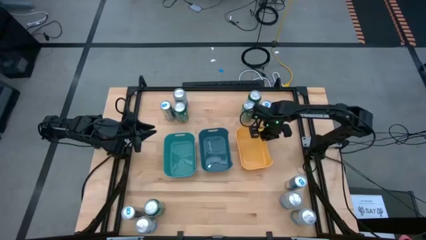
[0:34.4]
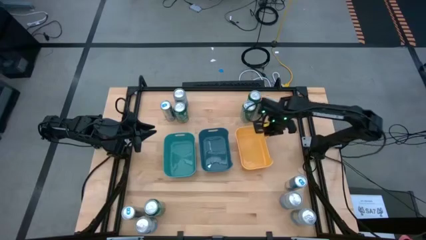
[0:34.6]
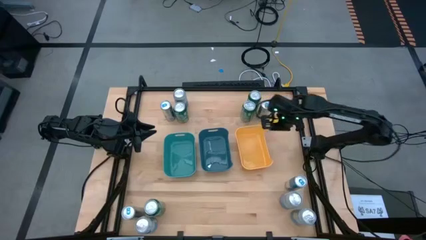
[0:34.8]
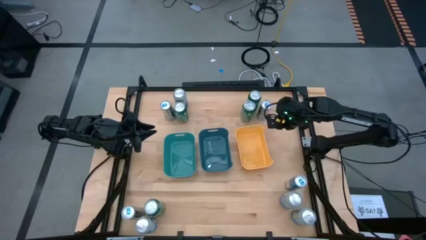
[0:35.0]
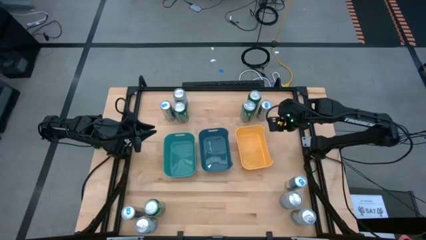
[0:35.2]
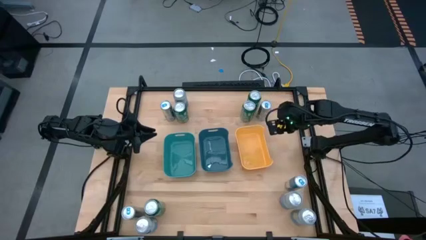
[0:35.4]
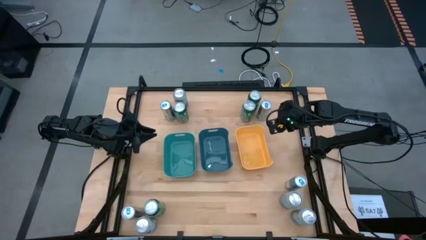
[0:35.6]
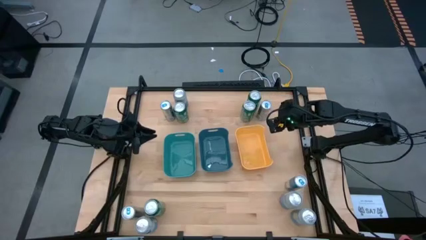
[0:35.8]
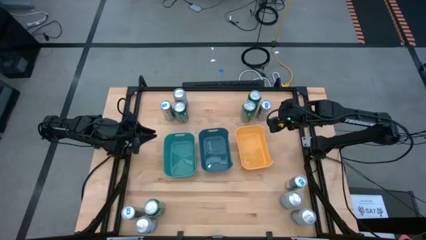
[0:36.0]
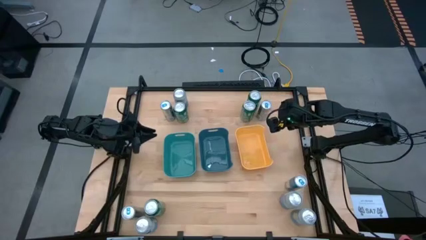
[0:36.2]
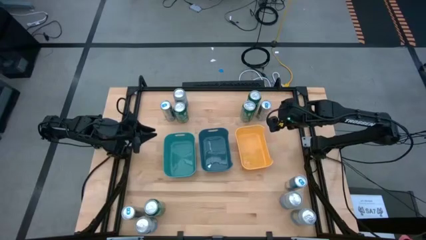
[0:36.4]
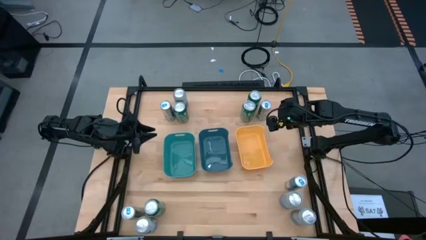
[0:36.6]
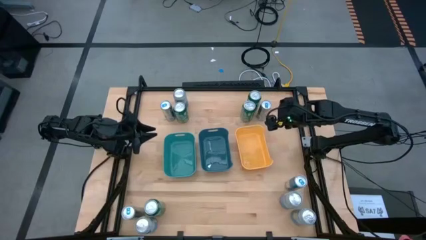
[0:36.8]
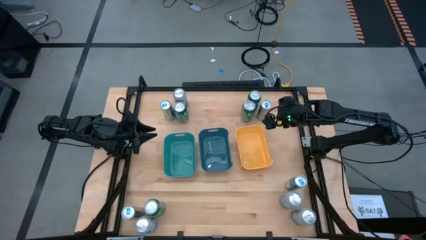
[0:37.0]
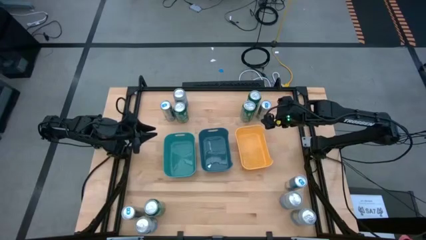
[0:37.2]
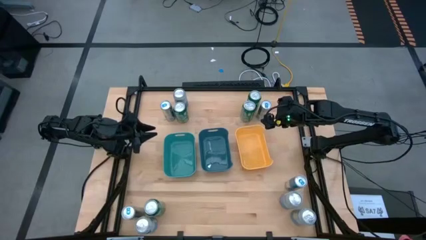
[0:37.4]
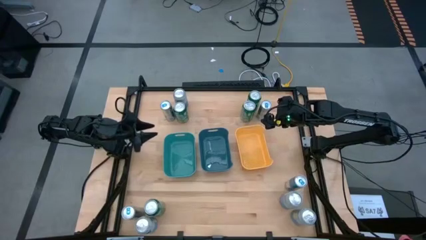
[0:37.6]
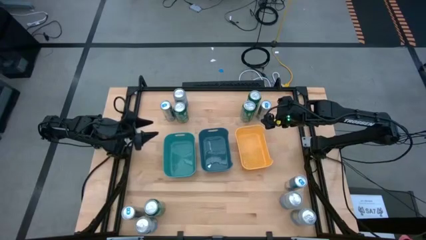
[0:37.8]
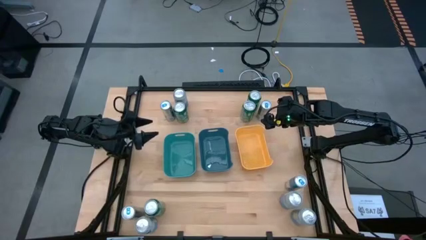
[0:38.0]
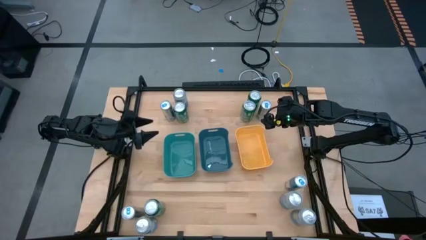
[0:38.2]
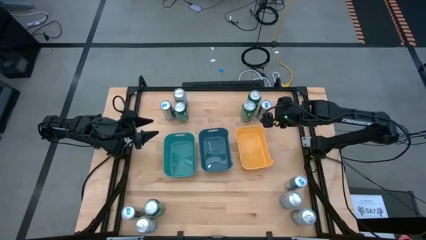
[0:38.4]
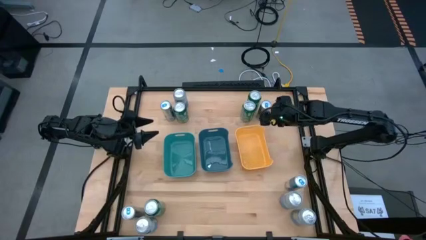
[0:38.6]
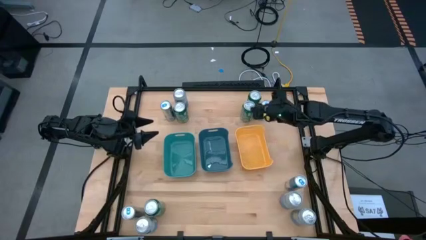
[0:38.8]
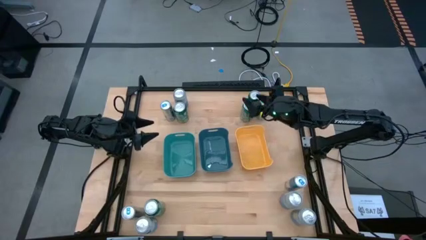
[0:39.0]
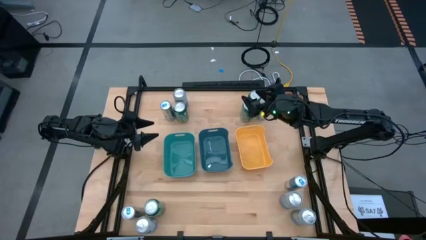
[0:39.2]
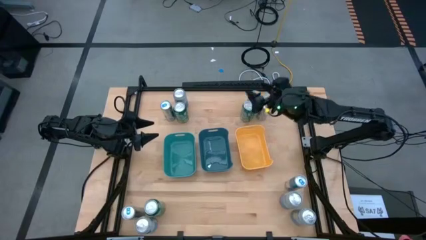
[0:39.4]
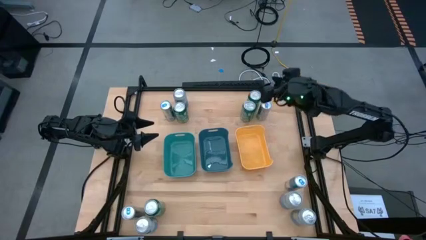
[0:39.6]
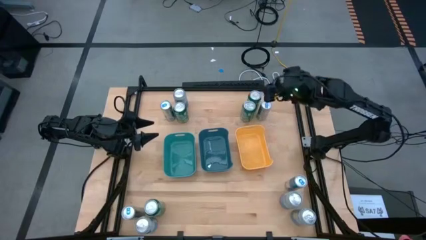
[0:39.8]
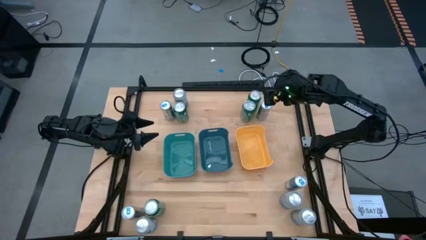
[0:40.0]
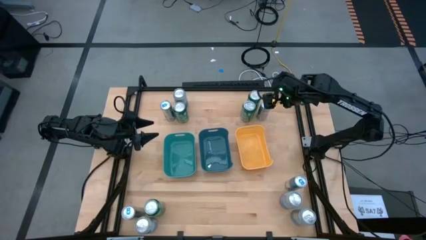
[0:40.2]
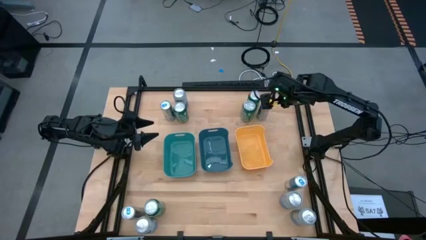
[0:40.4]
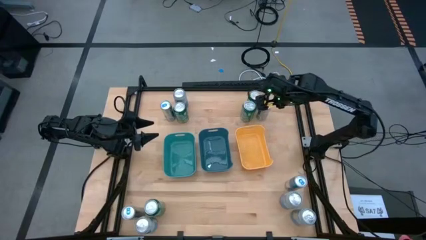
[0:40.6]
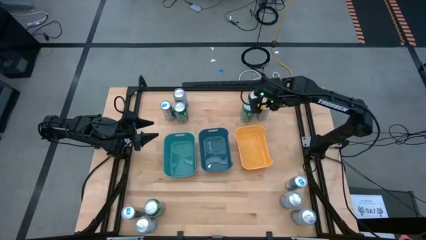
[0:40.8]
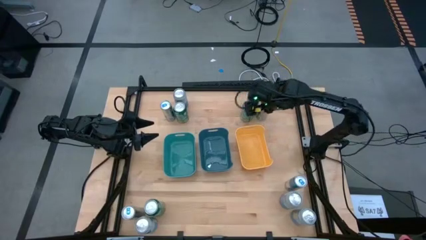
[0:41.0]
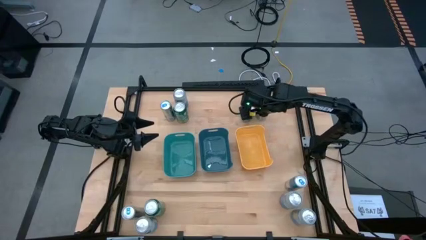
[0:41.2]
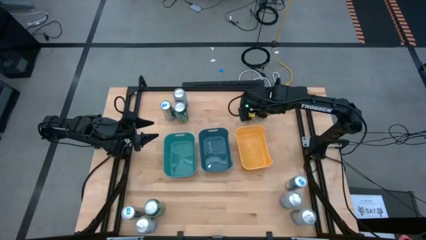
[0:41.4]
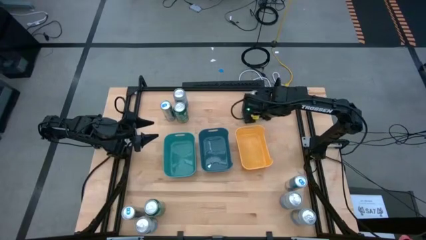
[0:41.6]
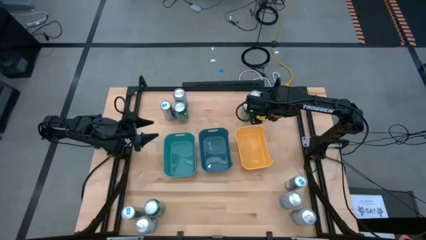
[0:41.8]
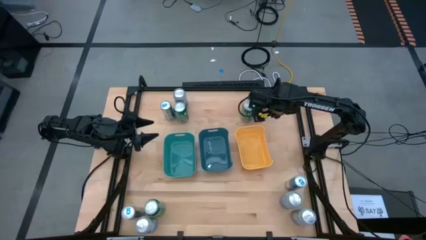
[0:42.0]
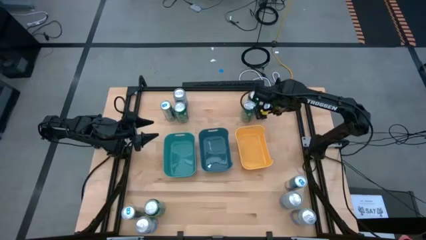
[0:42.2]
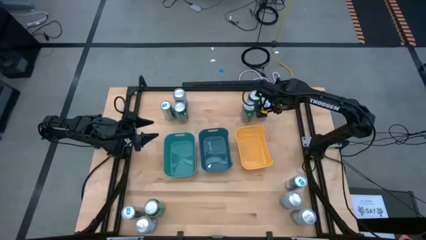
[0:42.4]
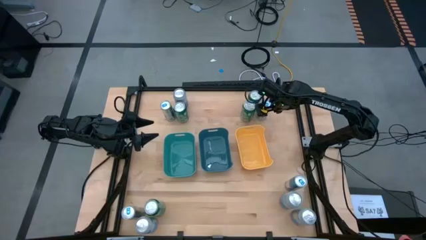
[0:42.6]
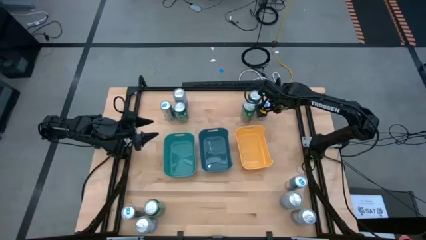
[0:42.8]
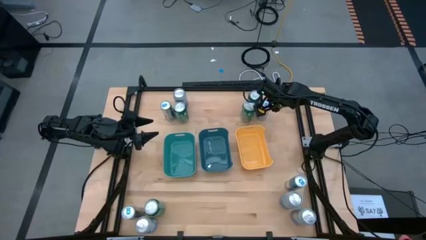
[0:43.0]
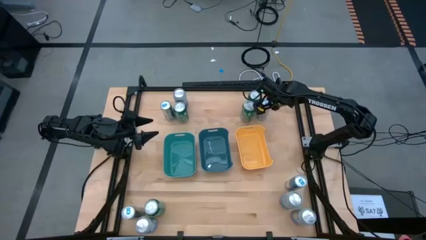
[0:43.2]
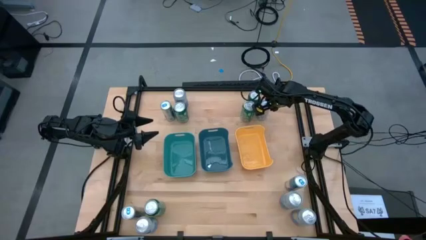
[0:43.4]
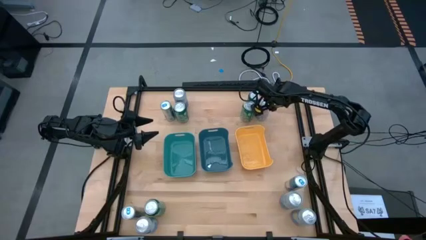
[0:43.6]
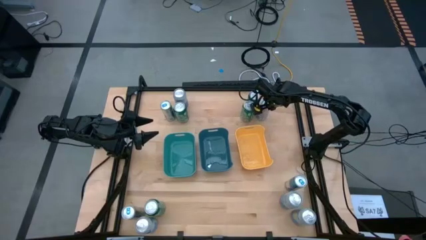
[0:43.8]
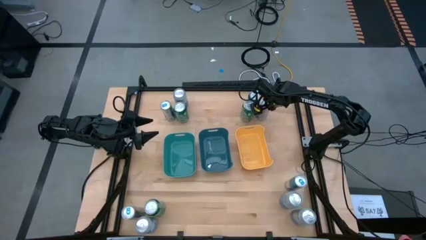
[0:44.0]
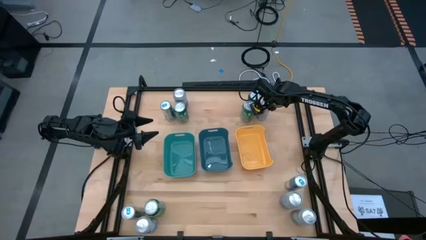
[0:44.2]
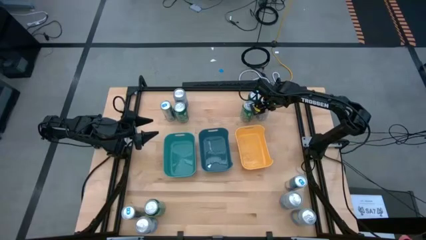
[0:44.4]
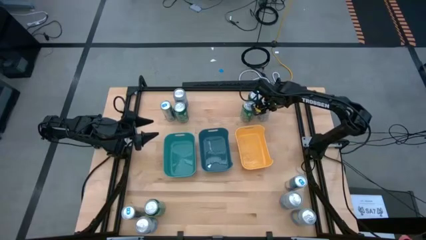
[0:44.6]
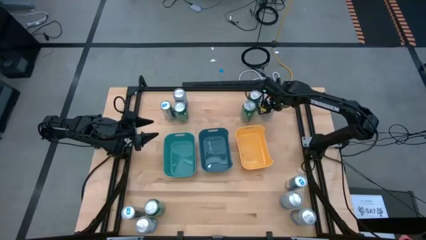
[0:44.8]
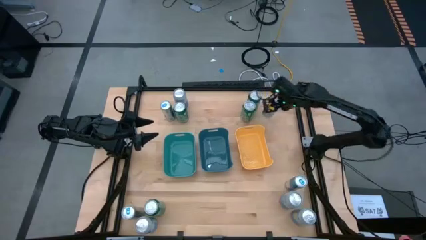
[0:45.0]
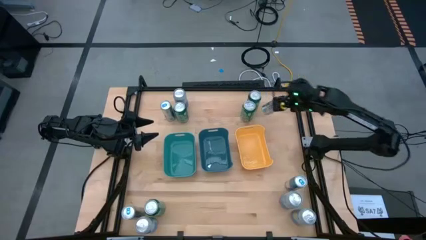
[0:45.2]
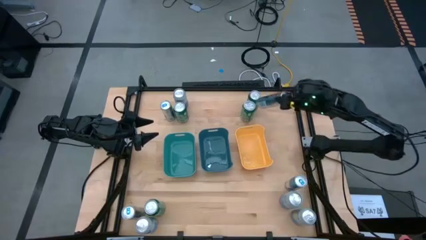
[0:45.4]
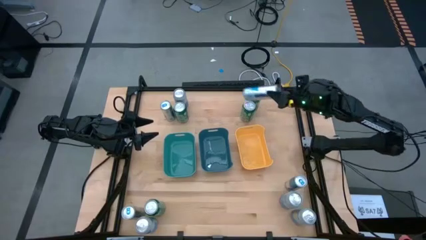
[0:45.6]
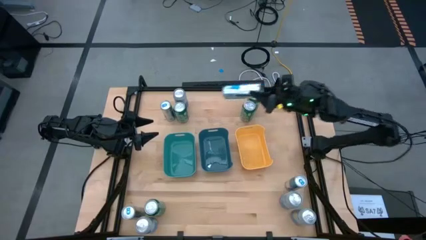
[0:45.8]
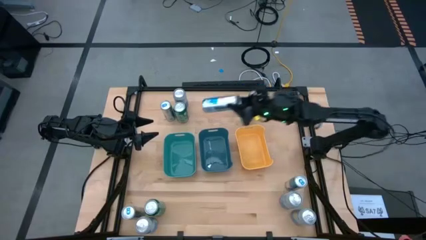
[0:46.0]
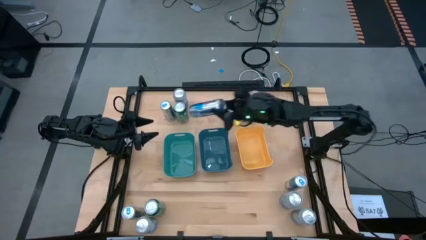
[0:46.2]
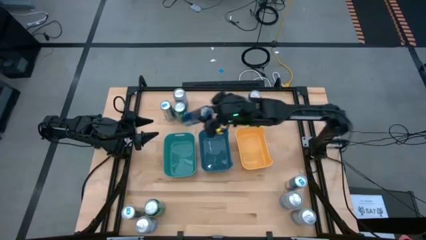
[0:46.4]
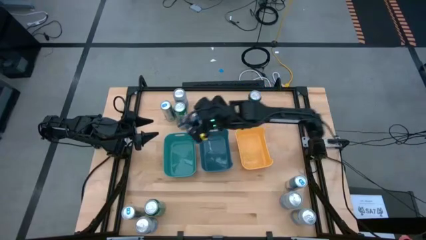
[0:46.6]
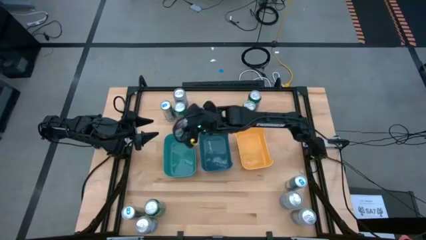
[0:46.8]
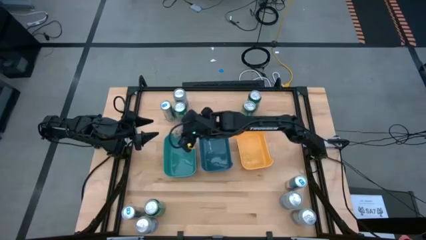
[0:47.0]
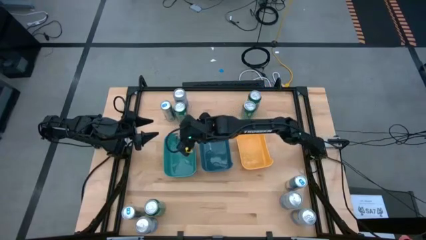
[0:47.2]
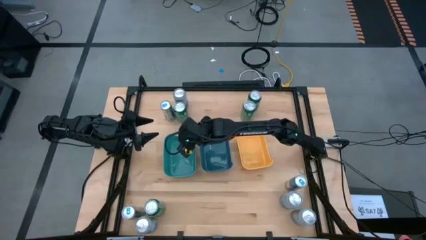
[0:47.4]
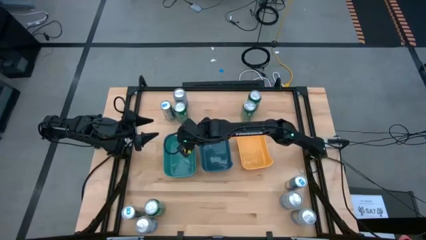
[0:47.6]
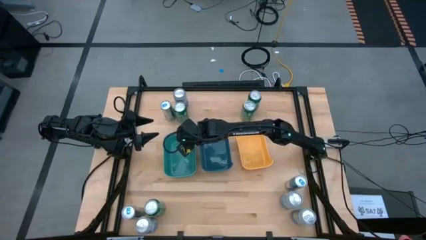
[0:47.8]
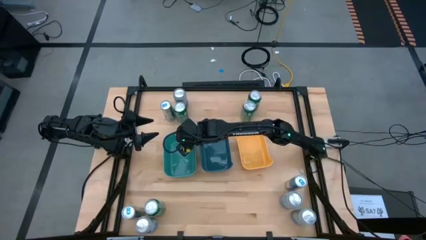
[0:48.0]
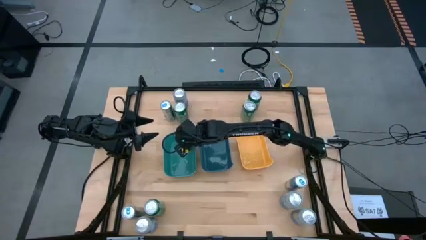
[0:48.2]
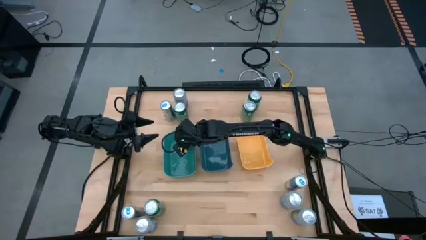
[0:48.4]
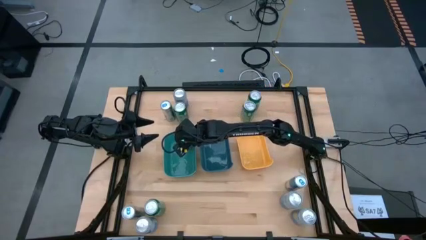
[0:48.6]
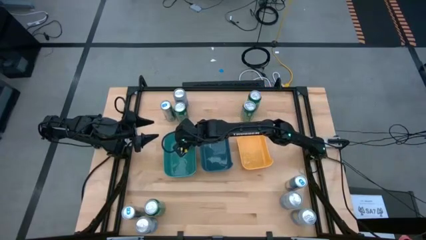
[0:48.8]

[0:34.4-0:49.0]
Task: Sort soda cans
Put the top right white/blue soda can into the green bin

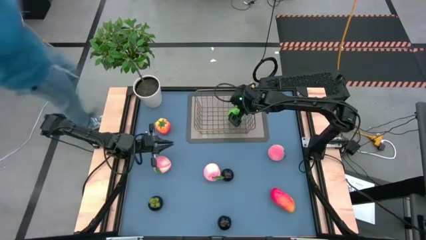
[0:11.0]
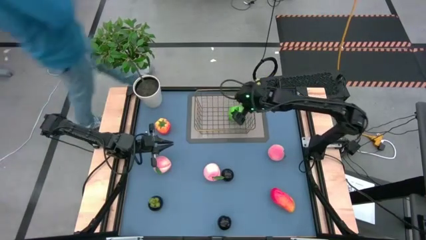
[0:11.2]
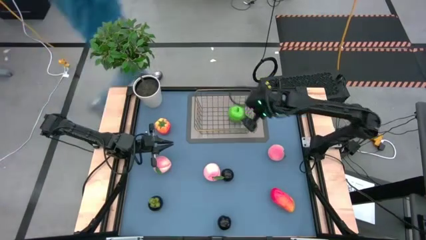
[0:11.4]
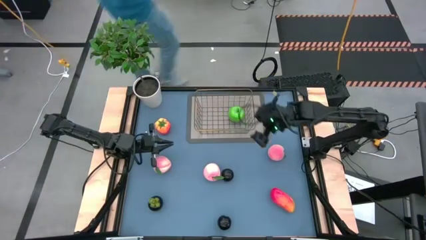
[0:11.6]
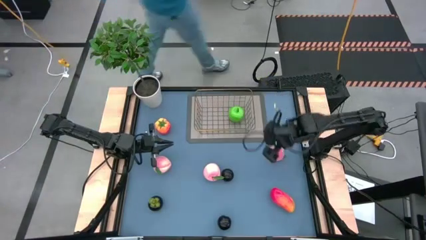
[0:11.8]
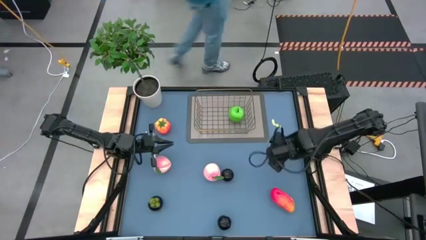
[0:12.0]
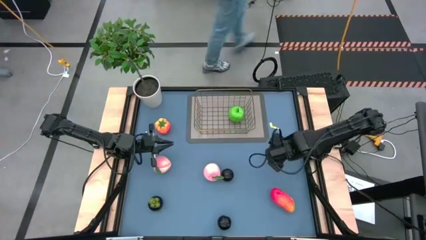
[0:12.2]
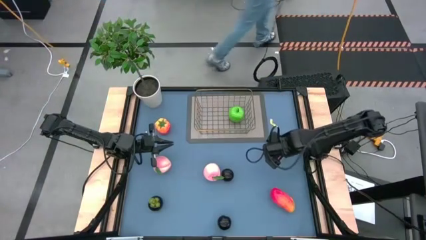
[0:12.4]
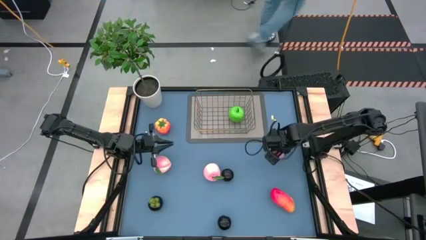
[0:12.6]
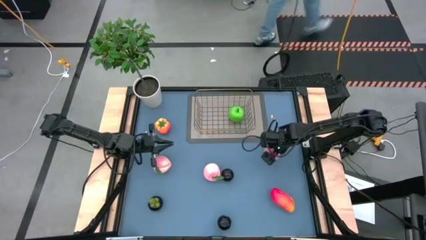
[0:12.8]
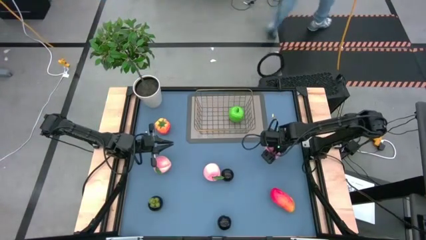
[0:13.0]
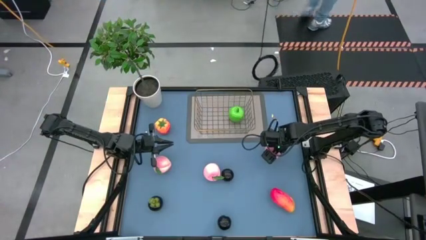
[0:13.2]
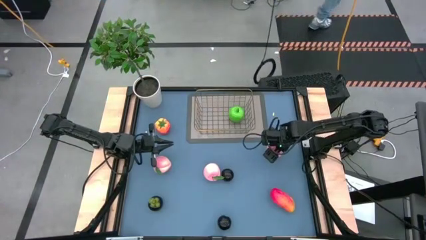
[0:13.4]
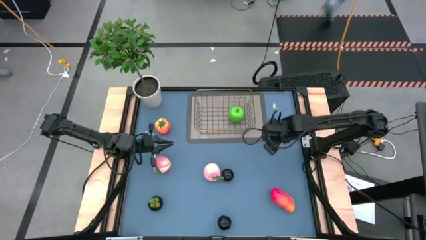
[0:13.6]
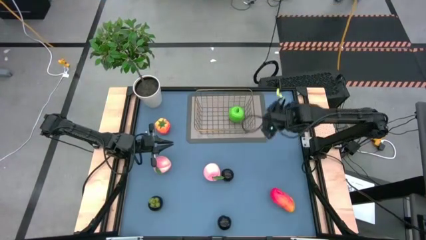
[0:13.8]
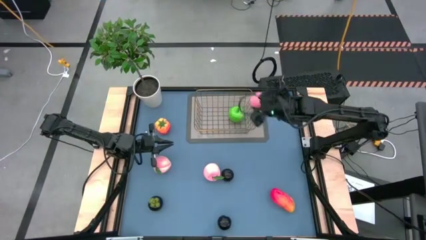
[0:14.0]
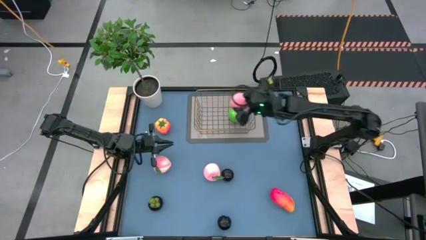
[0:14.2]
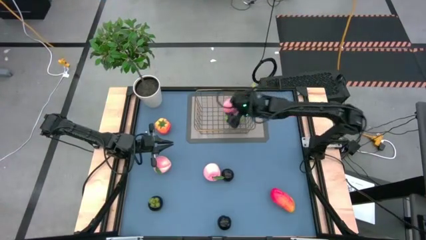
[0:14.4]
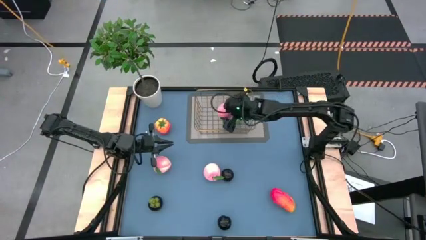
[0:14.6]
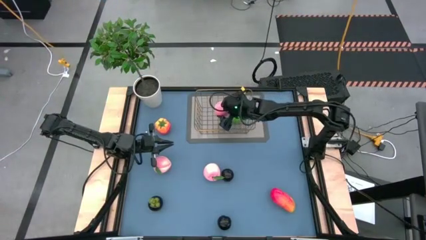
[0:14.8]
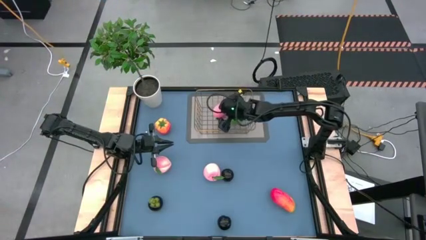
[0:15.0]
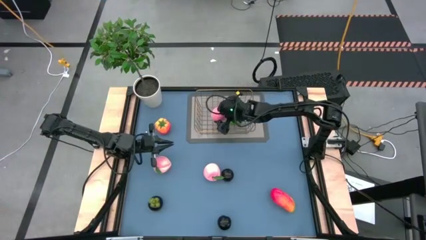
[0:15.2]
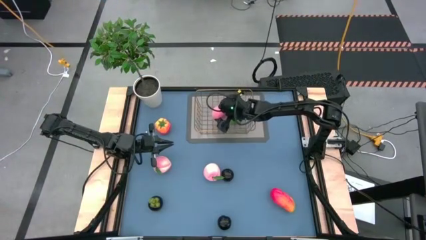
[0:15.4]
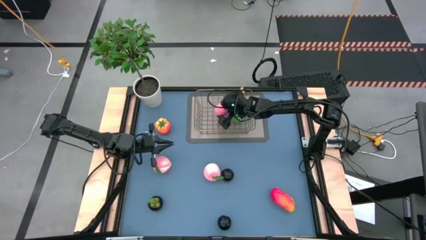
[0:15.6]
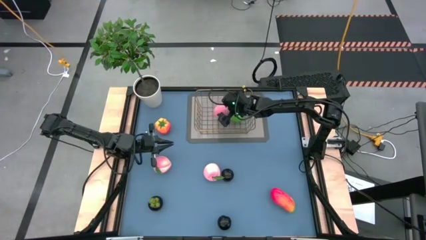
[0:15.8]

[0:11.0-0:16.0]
Task: Build produce basket
Put the right pink peach into the wire basket
